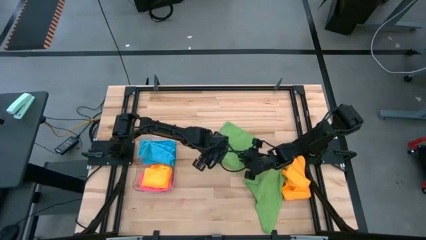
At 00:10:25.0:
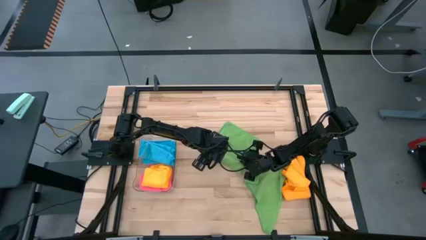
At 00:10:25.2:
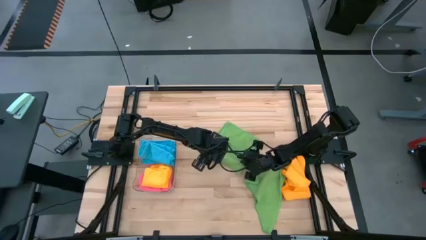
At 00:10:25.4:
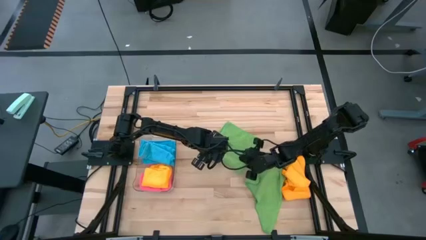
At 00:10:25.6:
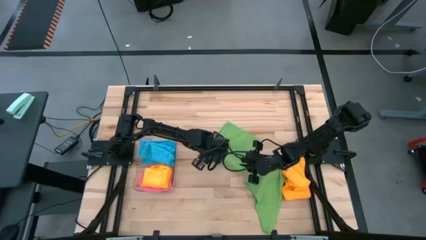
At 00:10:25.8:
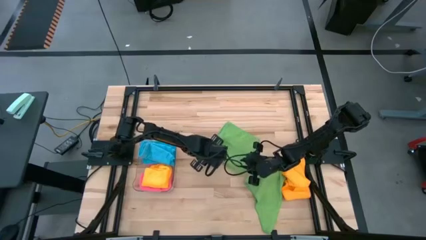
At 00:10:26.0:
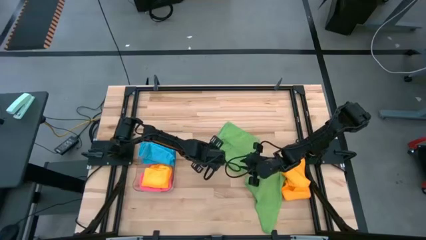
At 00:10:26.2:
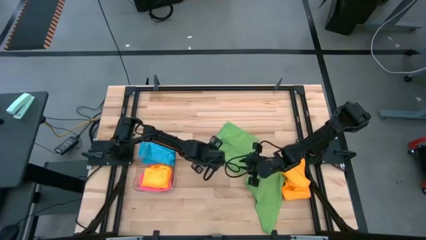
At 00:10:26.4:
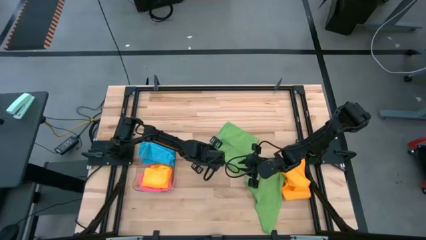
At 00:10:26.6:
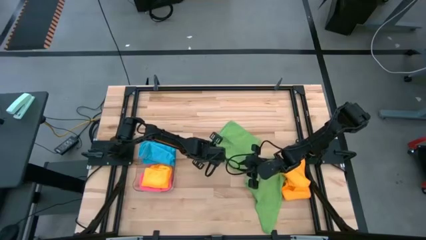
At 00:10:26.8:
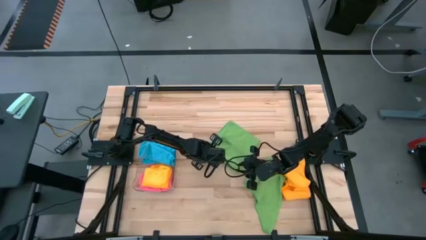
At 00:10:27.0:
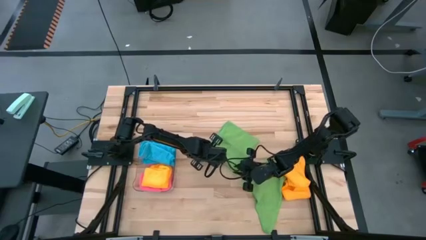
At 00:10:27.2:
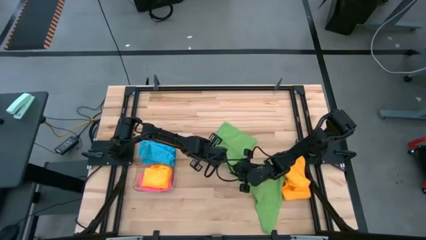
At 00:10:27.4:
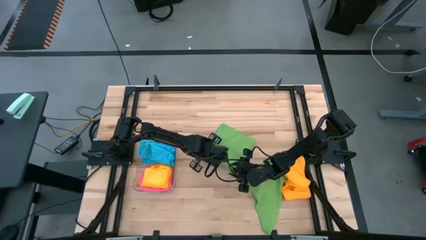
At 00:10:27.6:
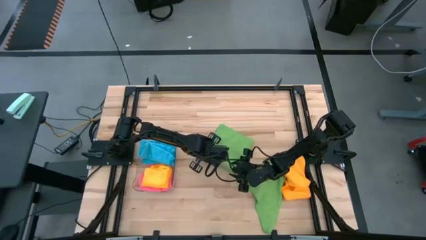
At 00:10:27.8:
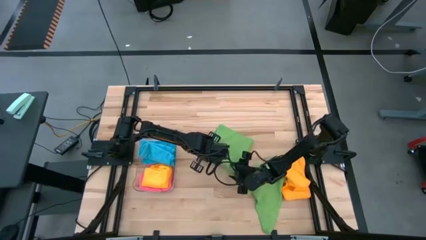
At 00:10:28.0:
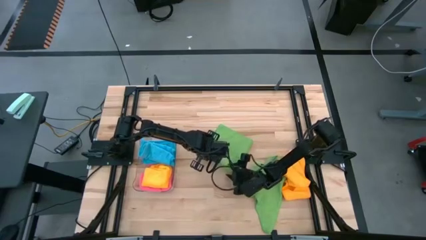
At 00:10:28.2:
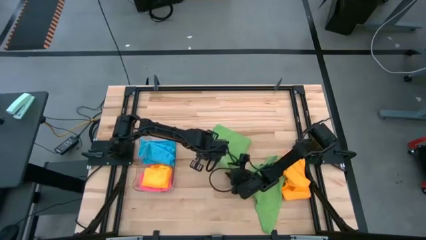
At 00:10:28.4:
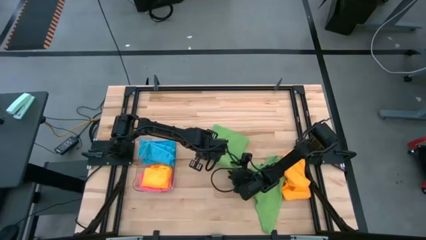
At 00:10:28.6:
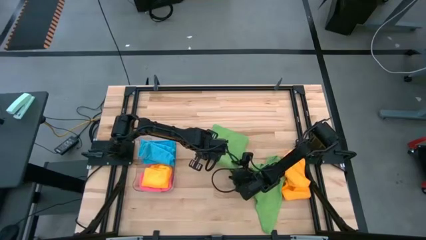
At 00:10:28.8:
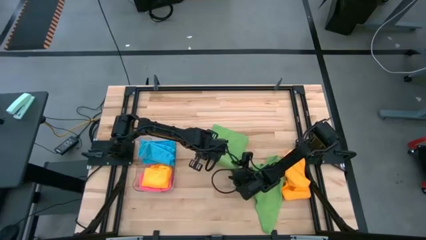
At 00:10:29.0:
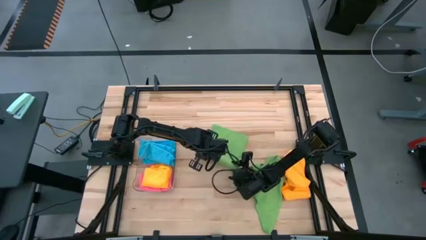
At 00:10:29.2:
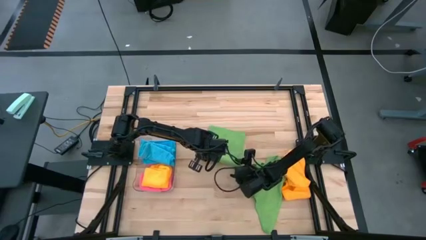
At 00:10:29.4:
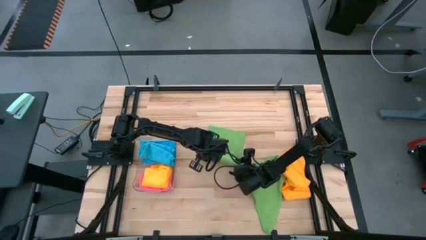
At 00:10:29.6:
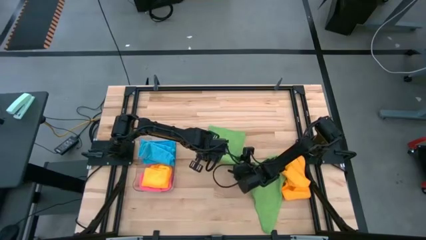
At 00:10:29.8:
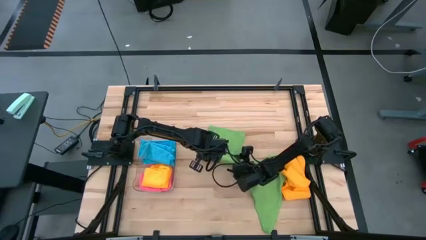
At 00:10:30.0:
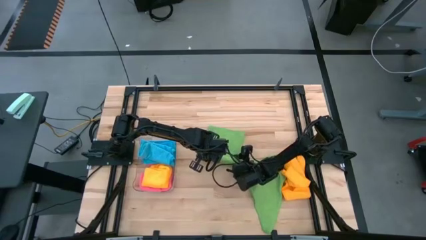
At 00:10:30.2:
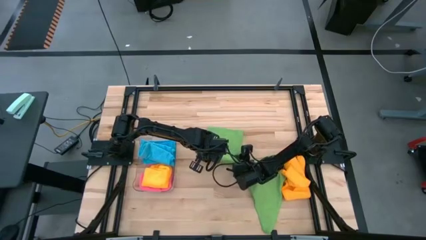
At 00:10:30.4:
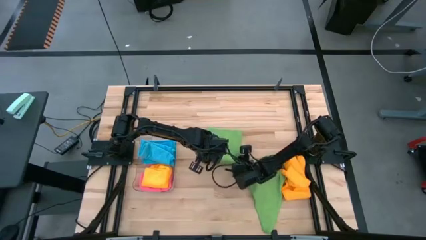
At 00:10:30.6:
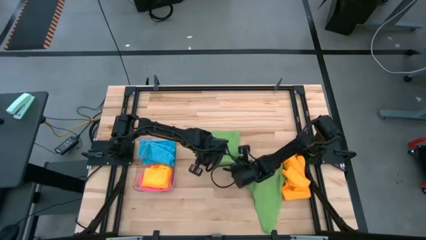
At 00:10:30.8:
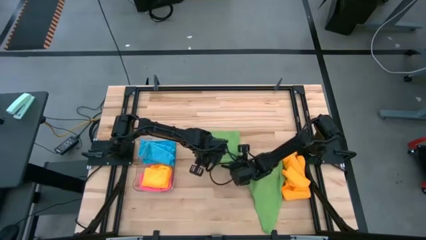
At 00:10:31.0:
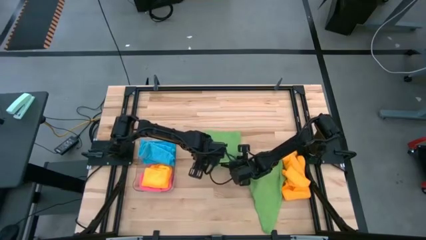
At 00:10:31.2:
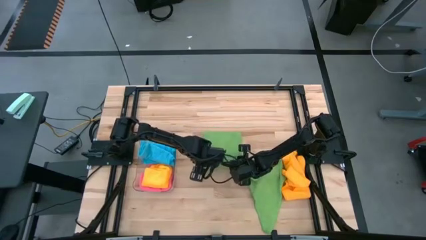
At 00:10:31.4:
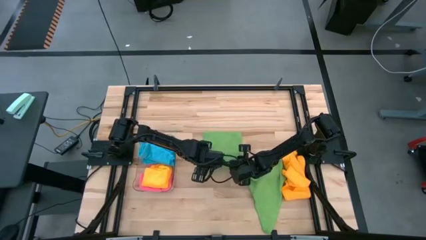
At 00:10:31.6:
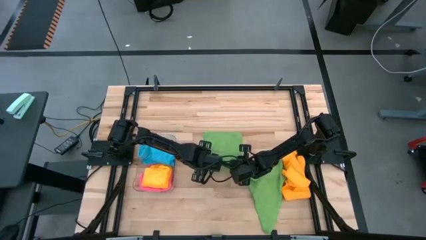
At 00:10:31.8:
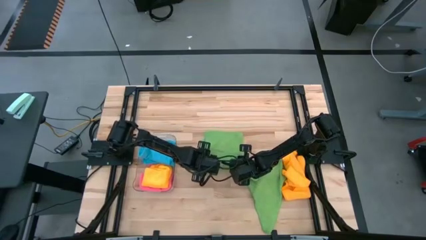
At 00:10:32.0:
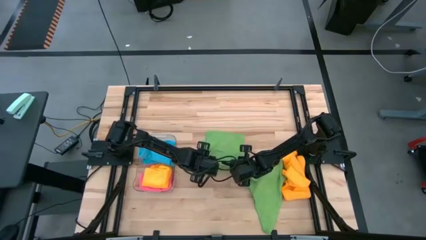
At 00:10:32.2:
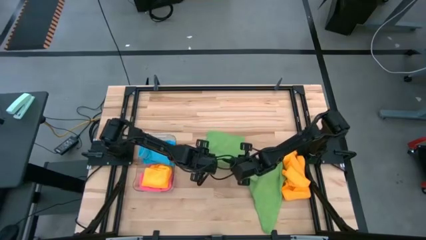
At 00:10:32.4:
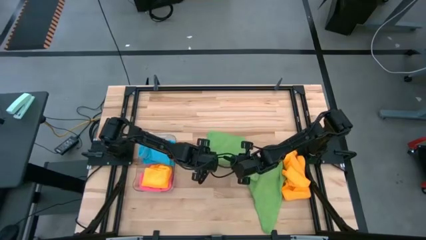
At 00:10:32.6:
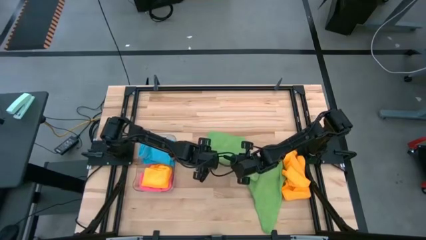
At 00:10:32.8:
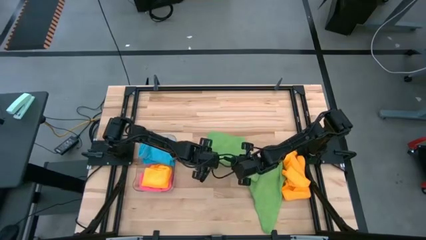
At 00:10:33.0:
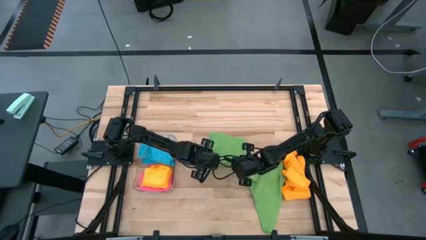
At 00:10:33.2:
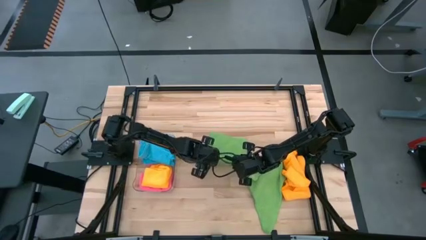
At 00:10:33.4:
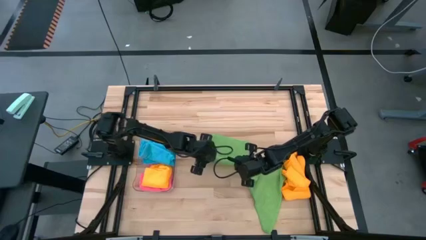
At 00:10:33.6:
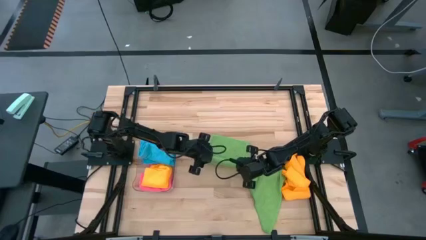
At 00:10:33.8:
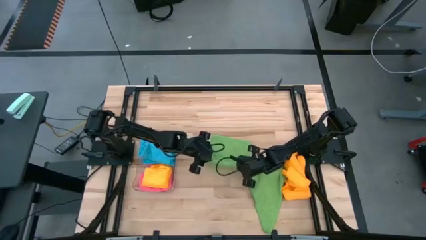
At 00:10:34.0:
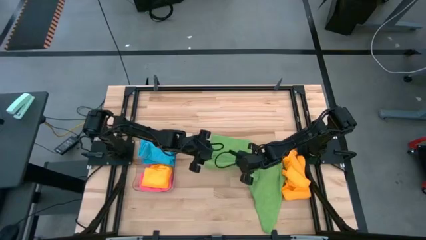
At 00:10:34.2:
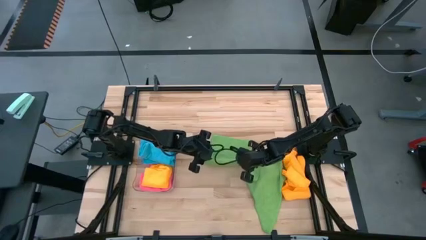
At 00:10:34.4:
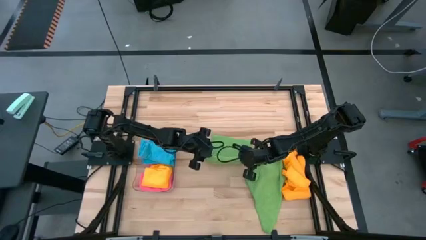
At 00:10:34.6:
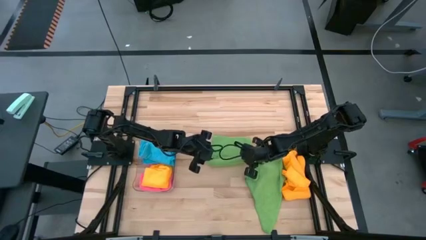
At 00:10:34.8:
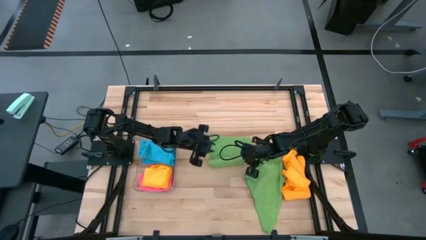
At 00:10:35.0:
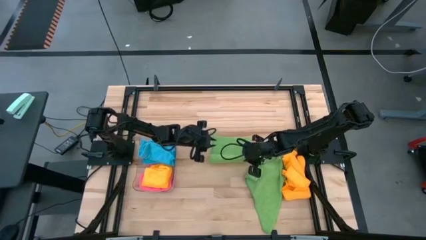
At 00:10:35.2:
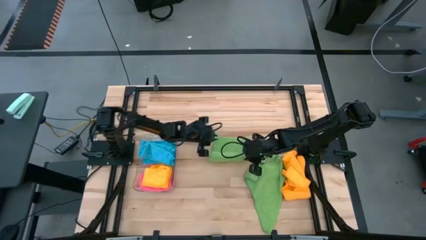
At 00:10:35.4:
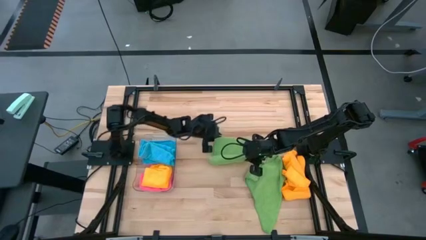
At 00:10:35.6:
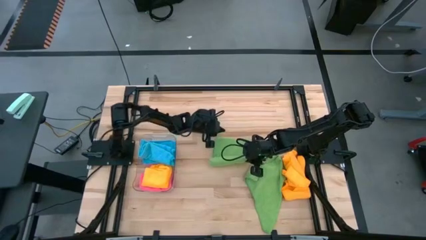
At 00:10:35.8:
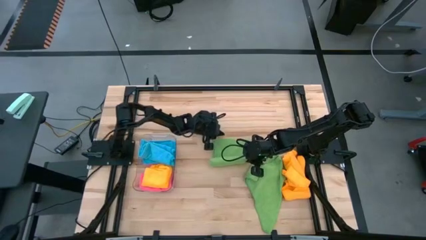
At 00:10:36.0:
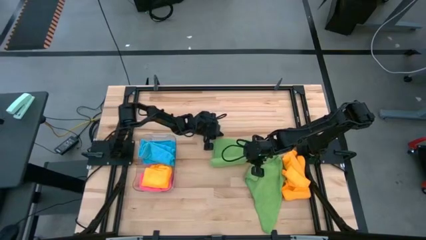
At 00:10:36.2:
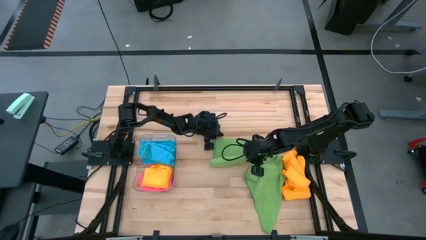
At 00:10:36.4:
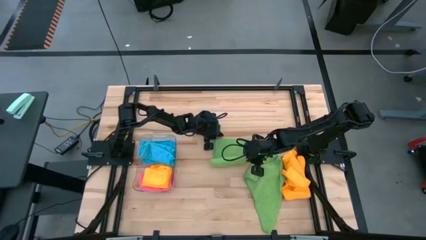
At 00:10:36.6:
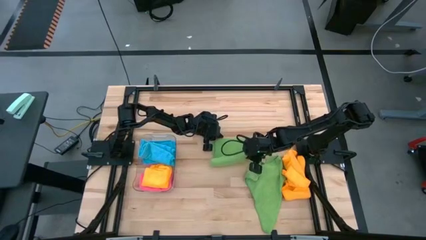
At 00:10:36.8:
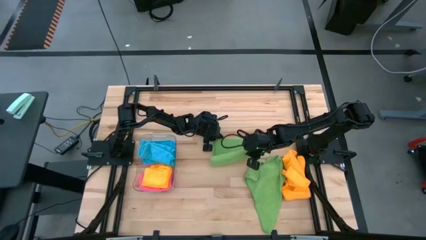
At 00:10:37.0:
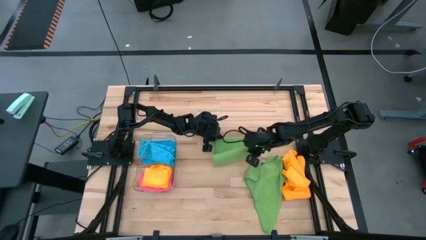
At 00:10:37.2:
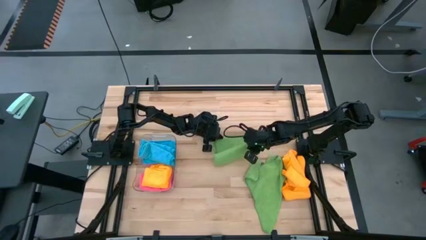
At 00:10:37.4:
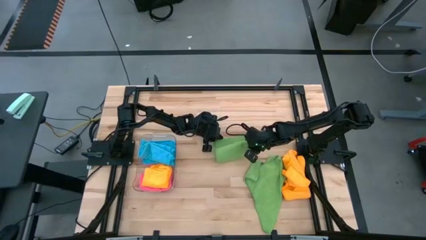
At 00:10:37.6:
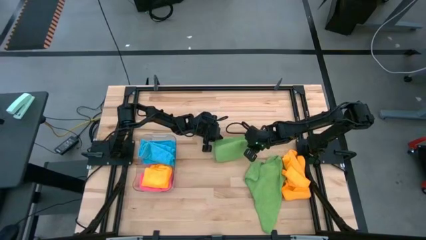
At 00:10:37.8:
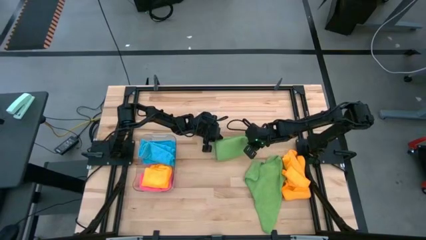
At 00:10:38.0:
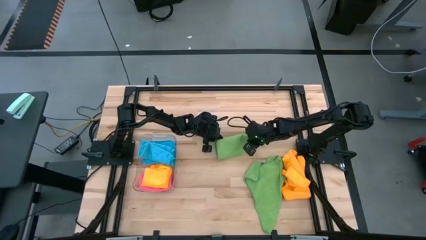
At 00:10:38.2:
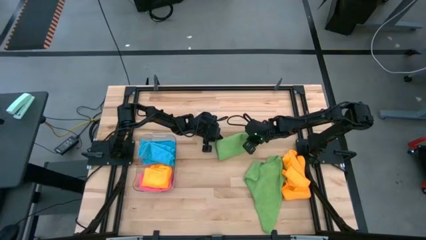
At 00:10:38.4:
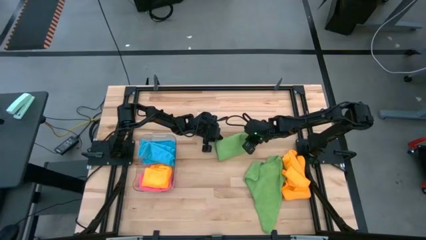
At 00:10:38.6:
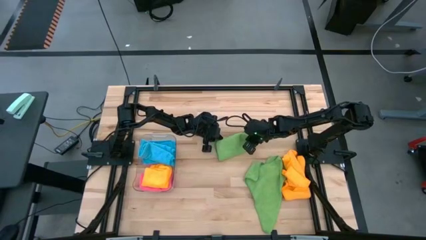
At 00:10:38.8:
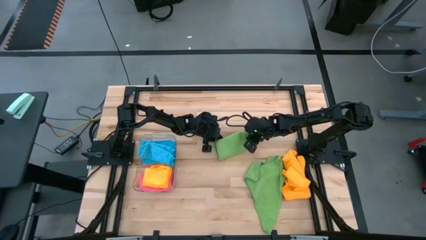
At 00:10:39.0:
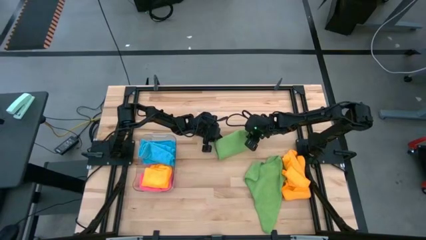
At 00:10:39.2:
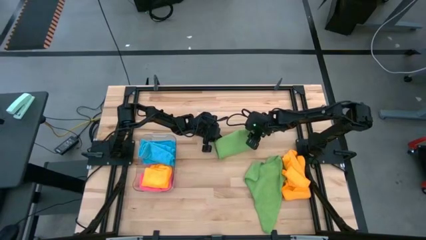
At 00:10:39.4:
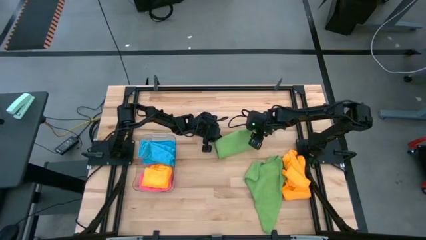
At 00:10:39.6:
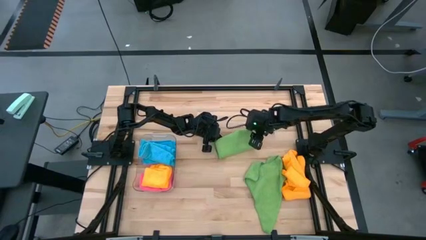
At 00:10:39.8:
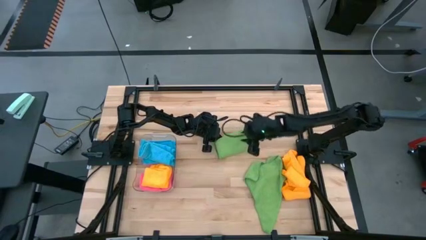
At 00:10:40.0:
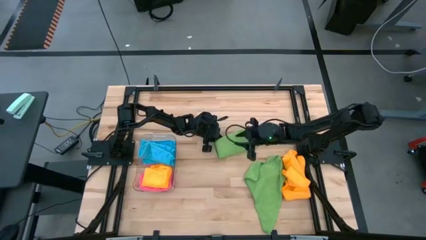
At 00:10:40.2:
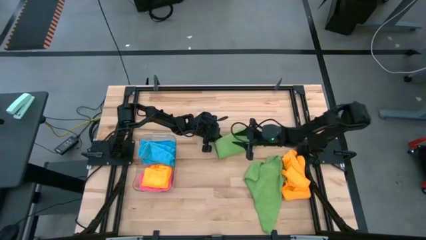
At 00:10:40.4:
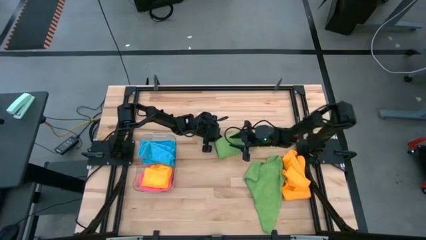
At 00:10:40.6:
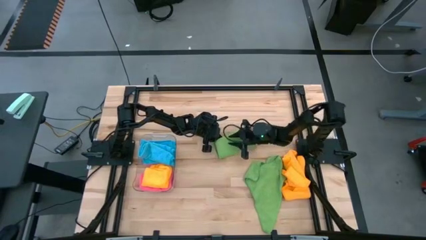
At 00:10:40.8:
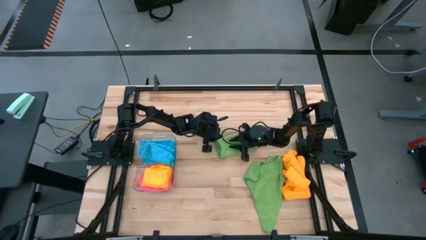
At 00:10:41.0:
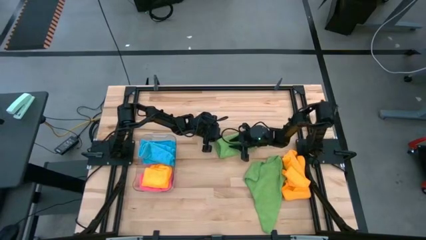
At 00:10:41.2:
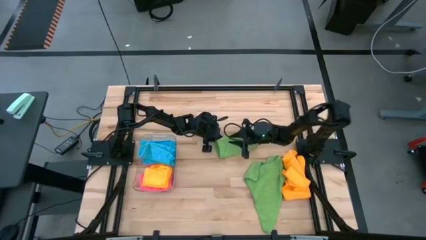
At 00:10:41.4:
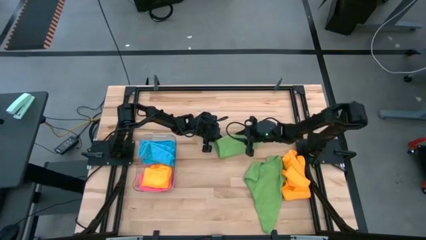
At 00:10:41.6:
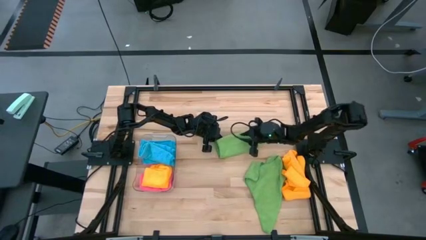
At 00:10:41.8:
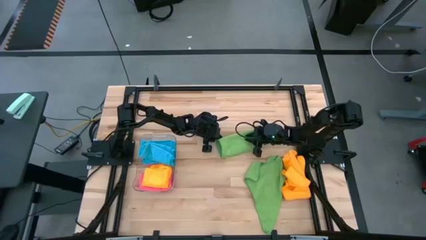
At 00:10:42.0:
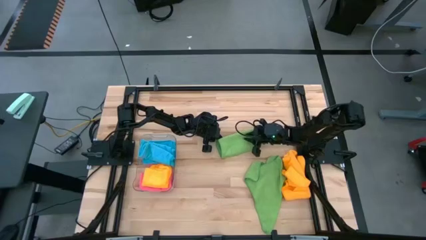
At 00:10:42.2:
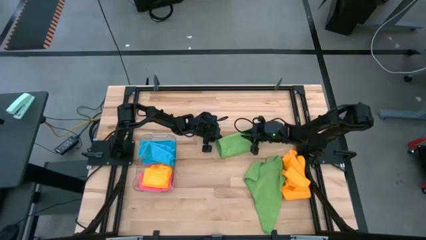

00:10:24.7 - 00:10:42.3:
Task: Fold microfiber towels
Fold the left green microfiber cloth
